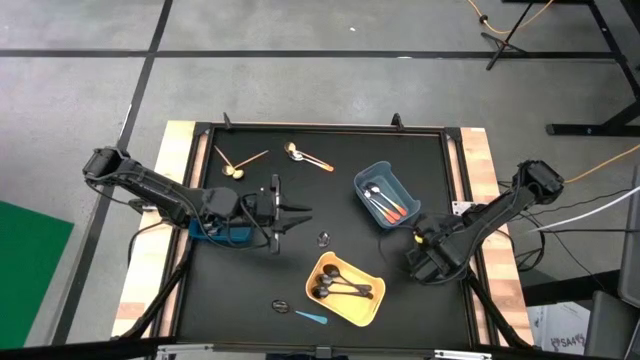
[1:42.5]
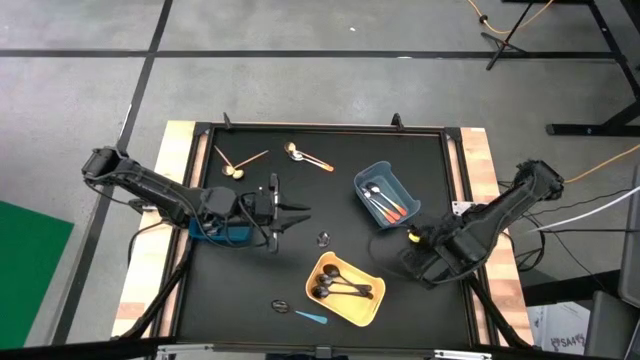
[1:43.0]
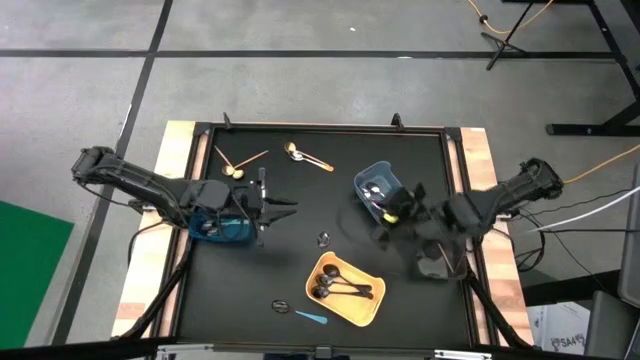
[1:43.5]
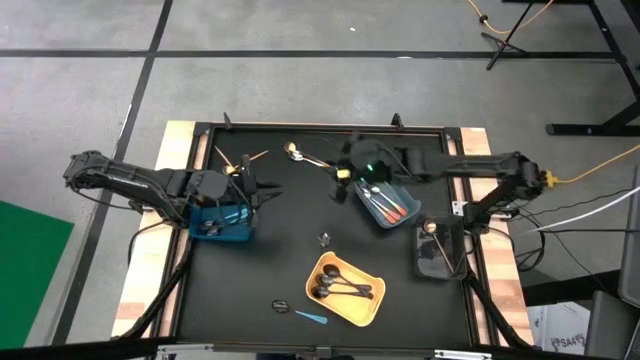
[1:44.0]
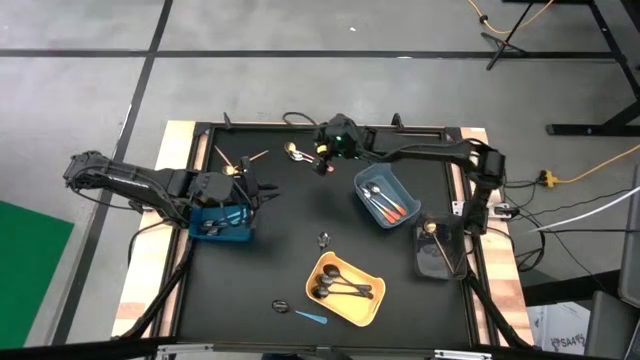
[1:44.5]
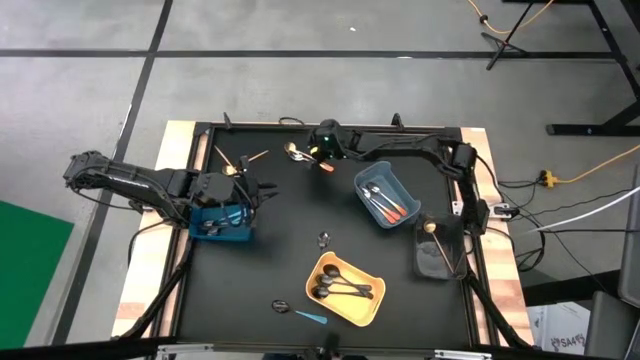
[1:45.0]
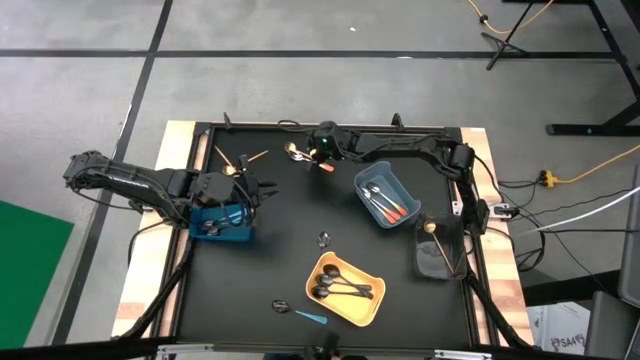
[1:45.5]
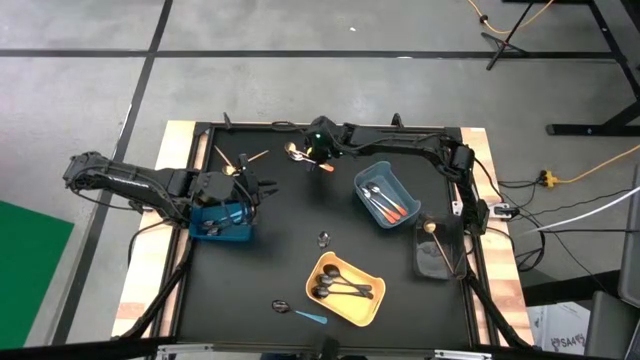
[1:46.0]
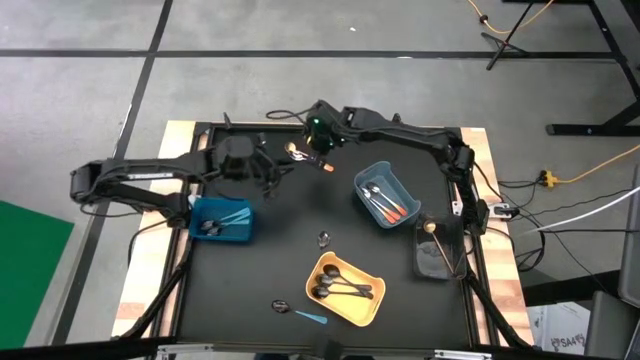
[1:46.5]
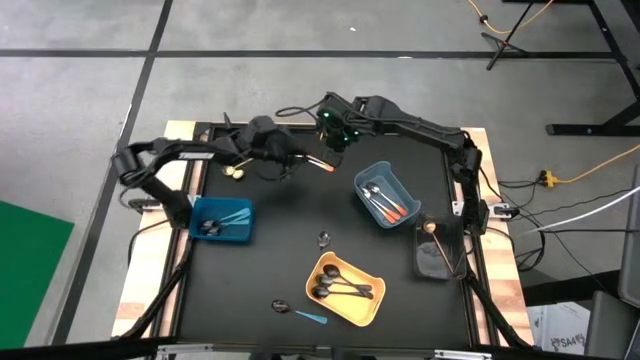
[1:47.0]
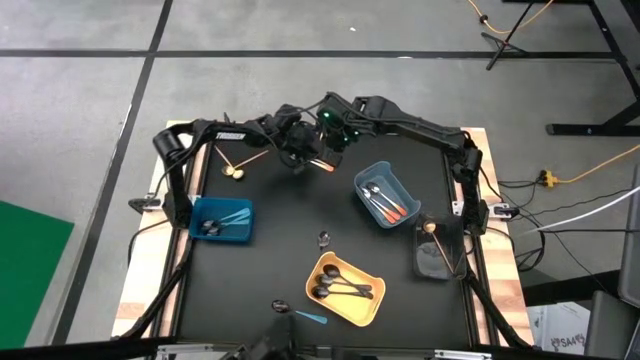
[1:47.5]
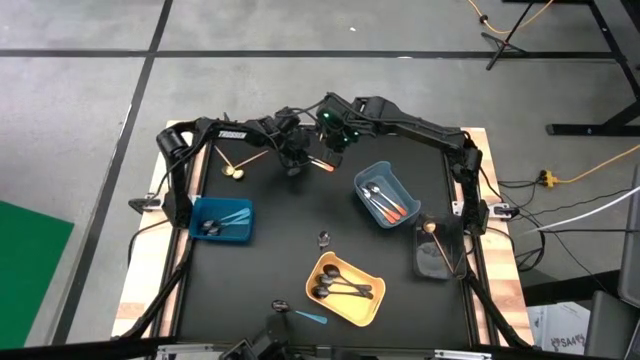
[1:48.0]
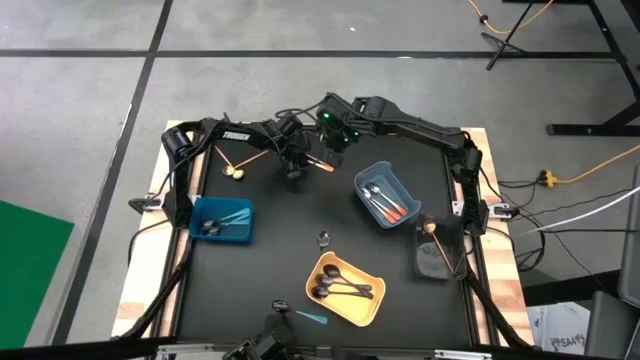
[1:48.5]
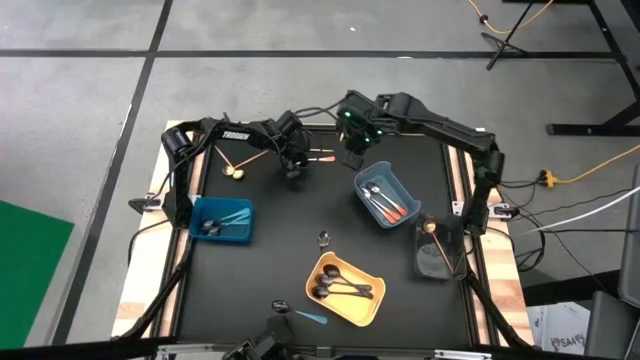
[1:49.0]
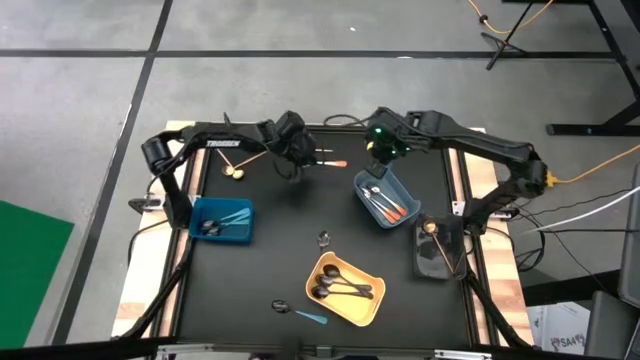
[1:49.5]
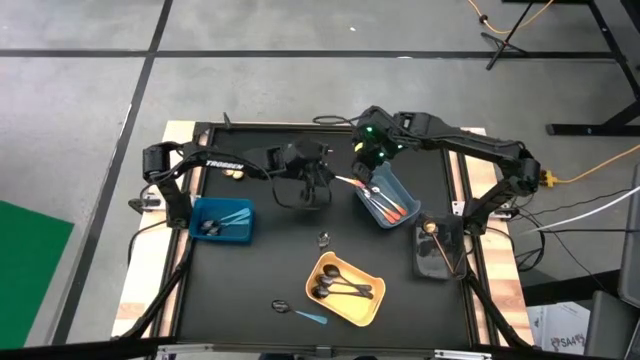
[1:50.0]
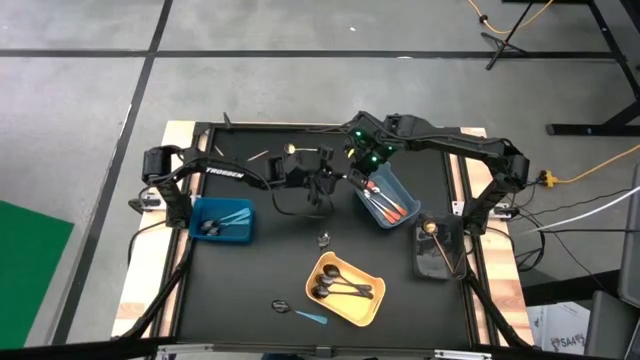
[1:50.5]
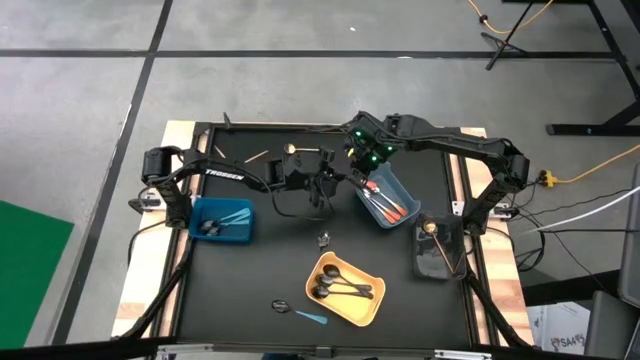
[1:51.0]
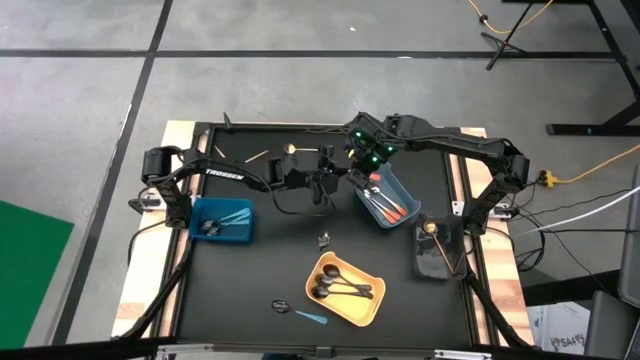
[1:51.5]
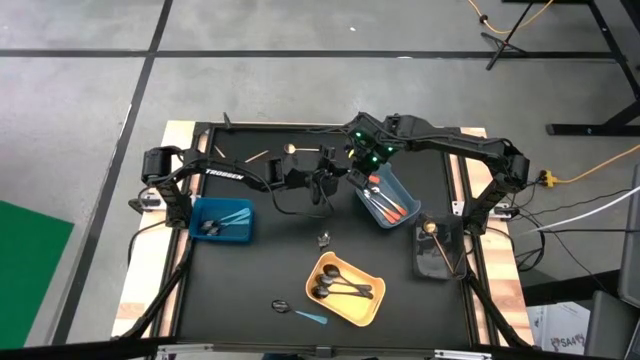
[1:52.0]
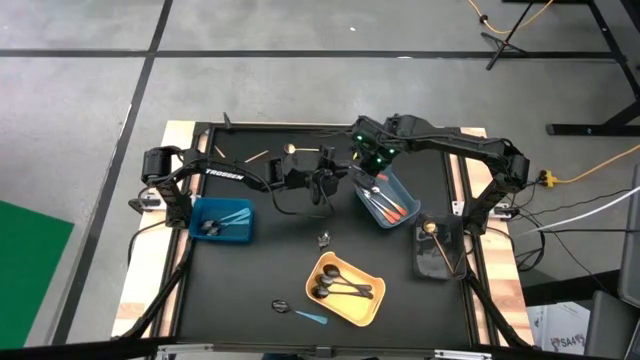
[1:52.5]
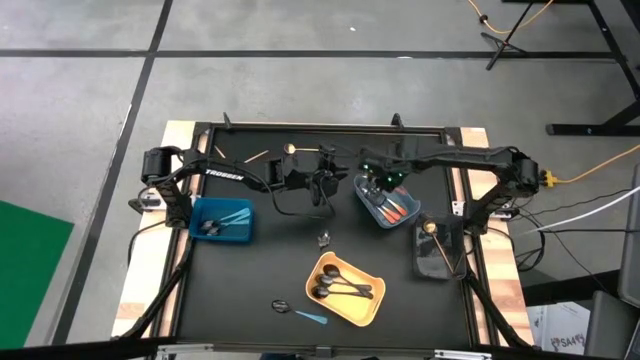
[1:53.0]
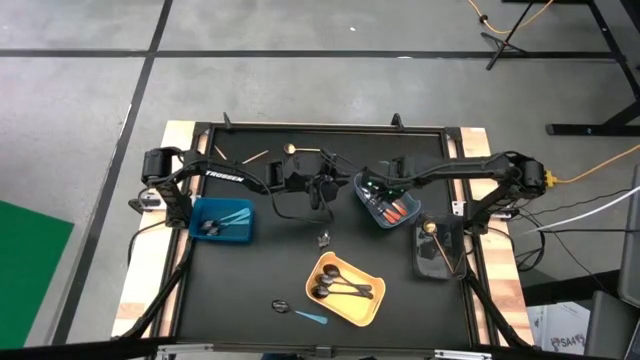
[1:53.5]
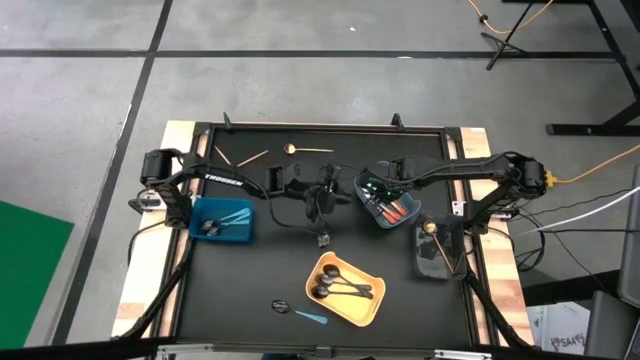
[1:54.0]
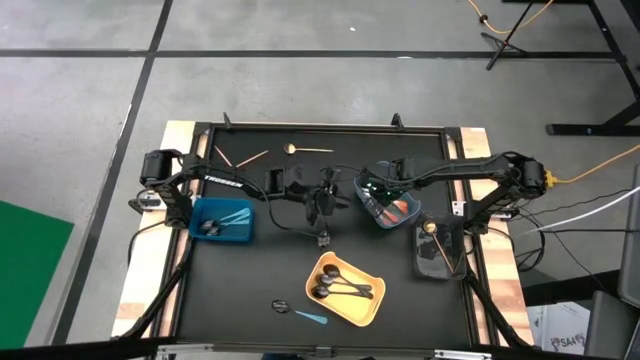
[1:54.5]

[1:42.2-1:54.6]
Task: Sort silverware by color (type)
Put the orange spoon into the gray bin

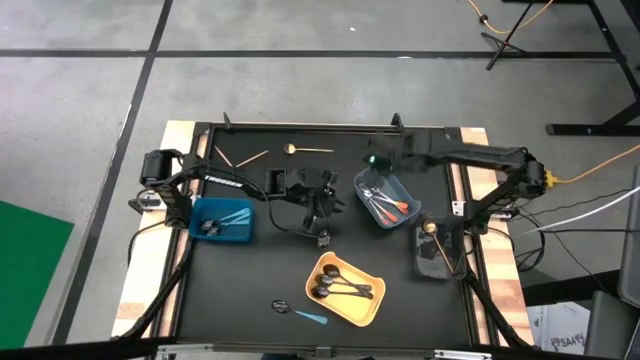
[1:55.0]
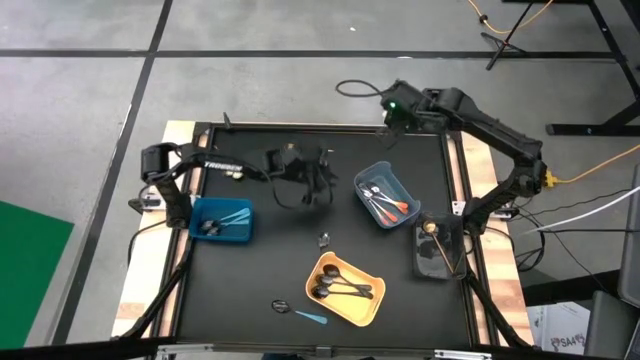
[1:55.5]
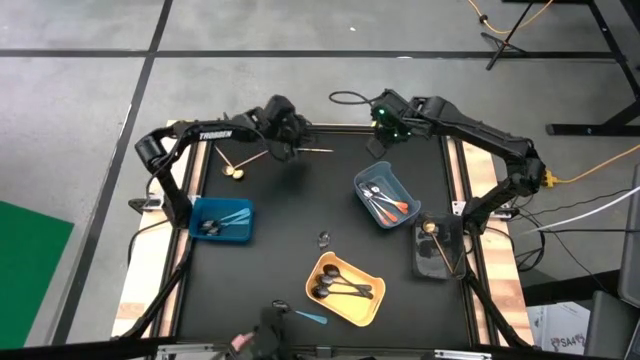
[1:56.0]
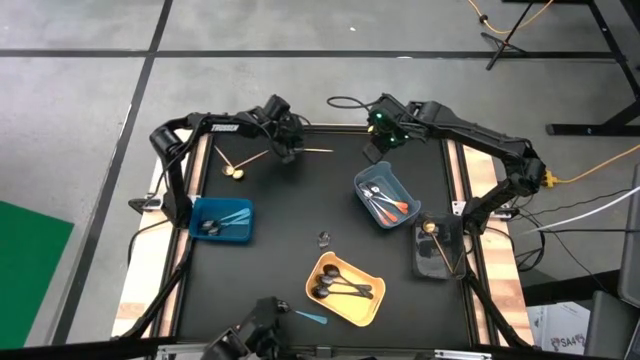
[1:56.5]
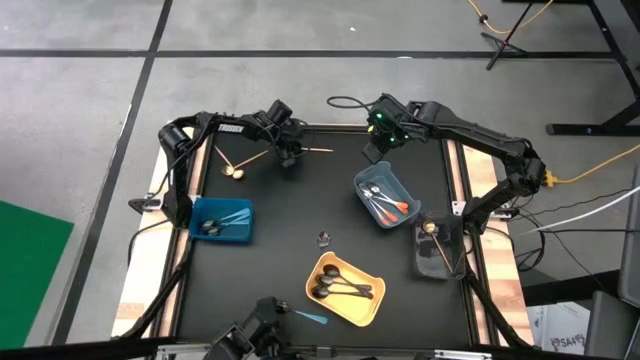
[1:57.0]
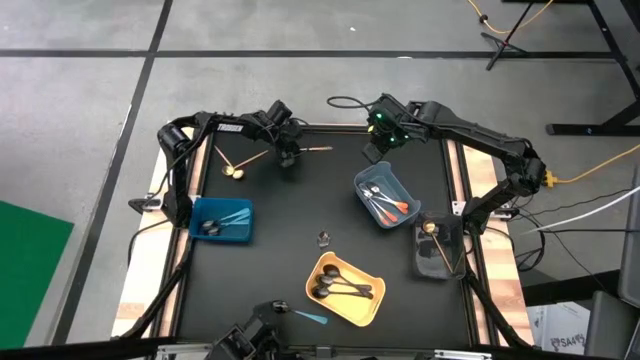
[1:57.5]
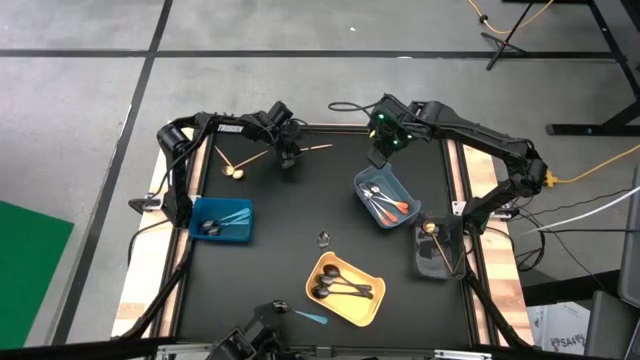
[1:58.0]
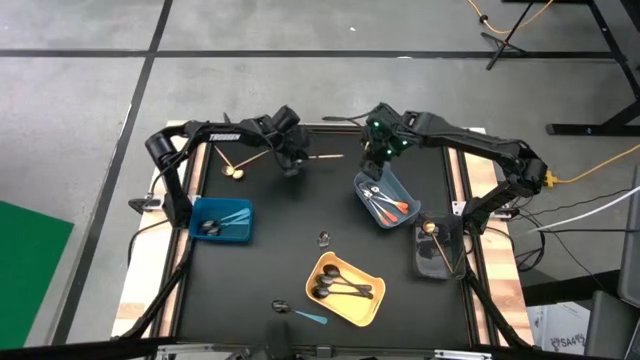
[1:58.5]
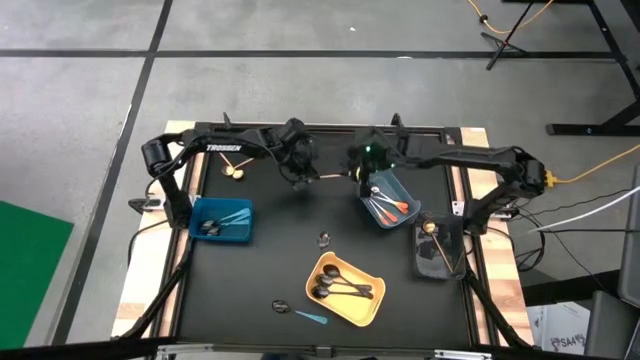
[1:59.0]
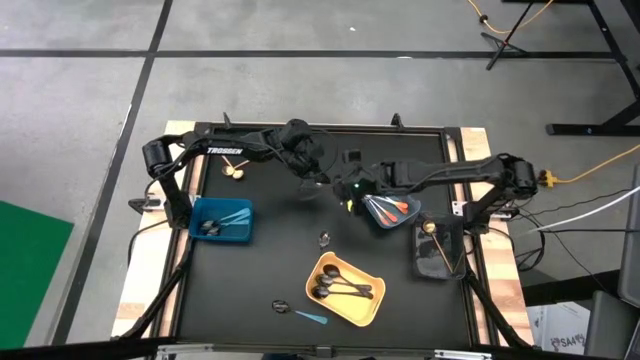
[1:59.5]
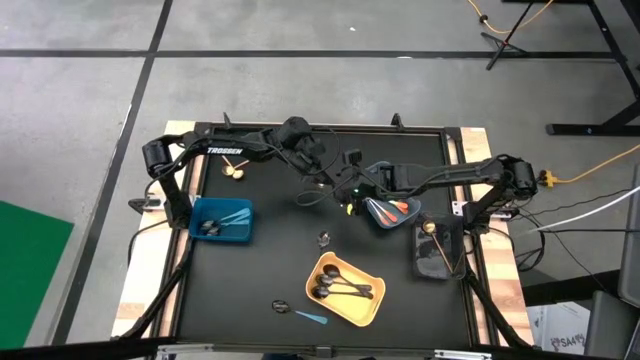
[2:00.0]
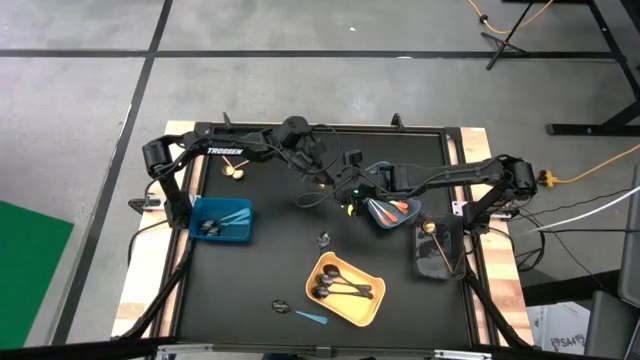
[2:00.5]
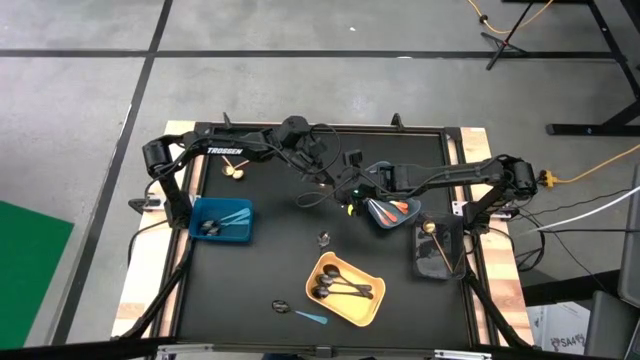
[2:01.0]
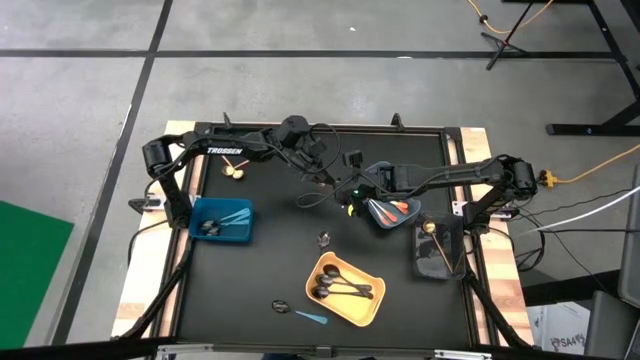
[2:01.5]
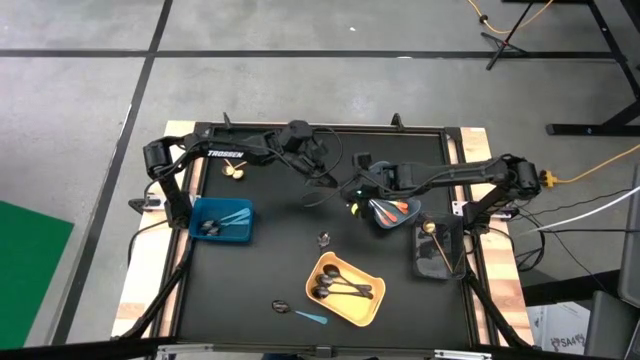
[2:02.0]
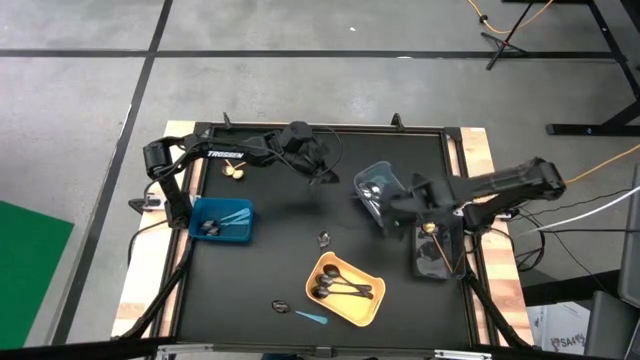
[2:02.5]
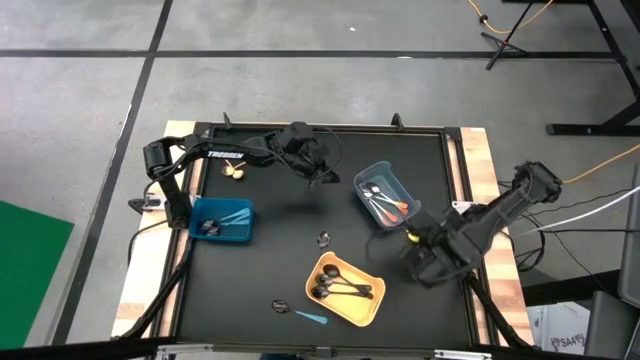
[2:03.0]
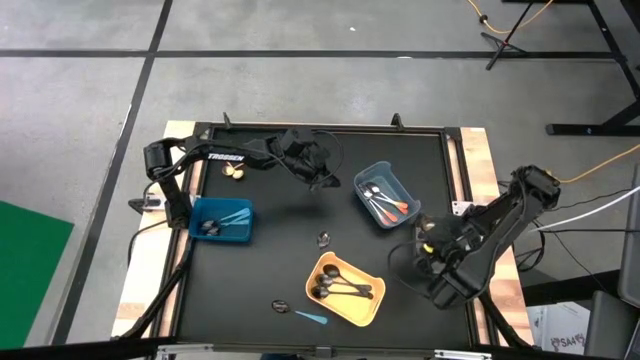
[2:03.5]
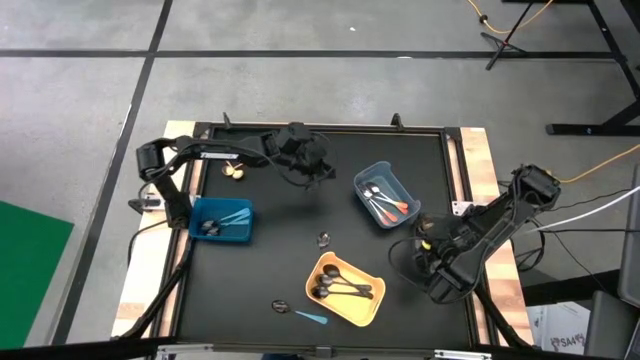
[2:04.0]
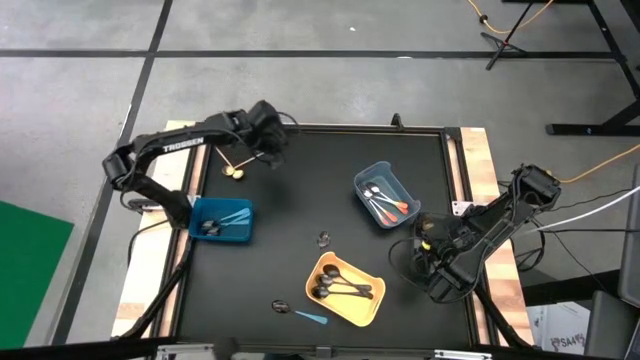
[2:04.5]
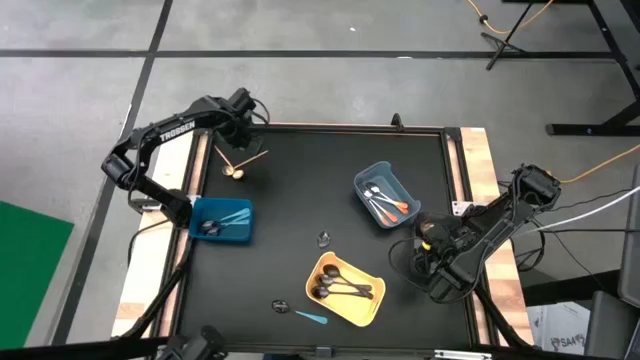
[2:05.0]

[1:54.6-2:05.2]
Put the gold spoon into the black bin
